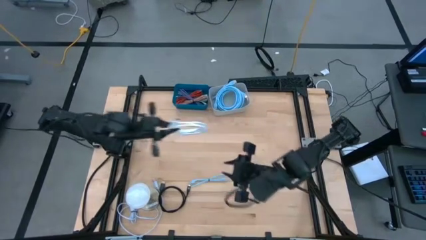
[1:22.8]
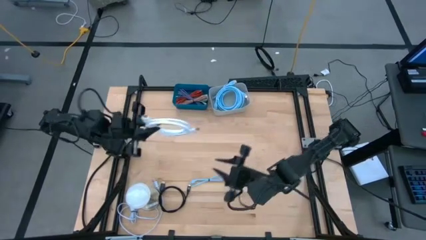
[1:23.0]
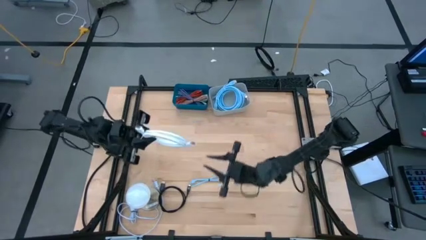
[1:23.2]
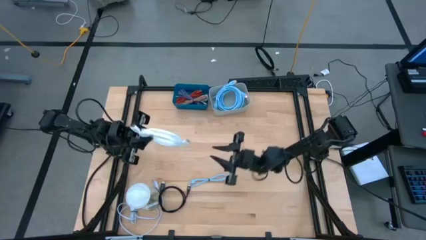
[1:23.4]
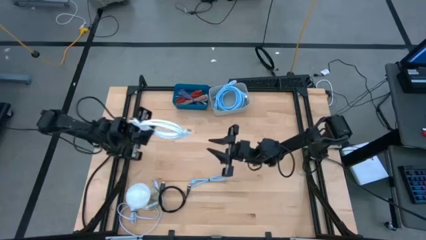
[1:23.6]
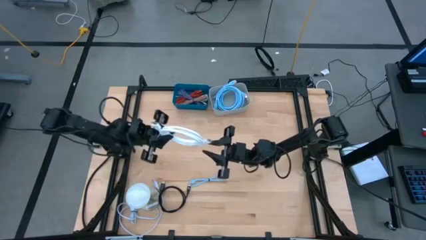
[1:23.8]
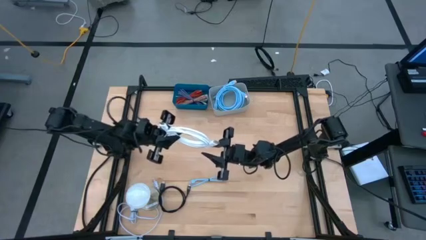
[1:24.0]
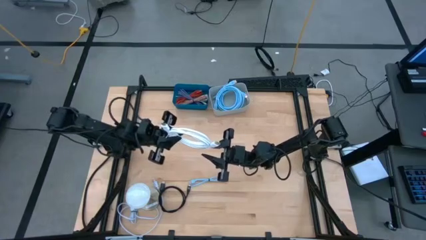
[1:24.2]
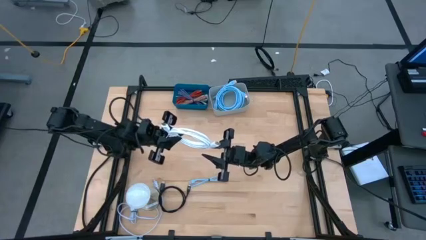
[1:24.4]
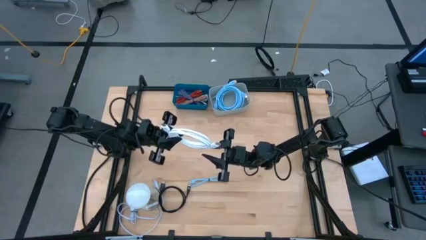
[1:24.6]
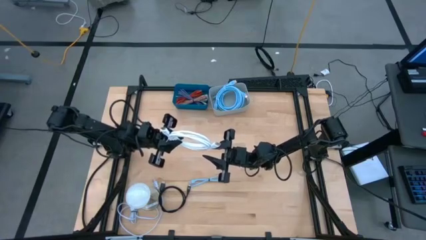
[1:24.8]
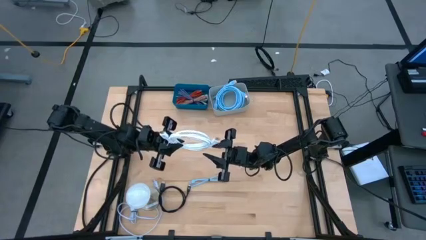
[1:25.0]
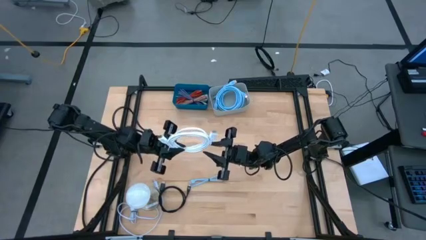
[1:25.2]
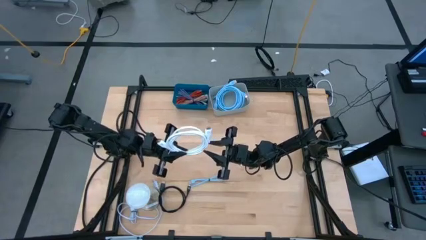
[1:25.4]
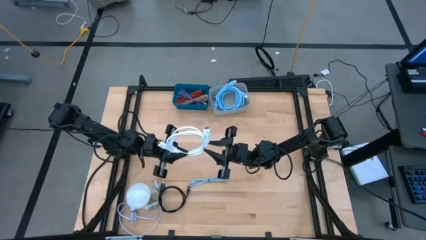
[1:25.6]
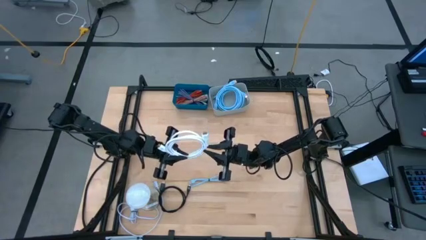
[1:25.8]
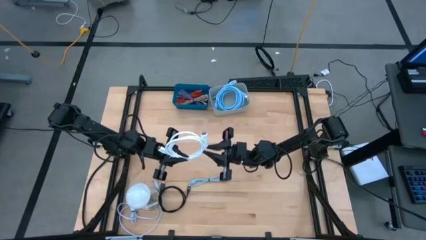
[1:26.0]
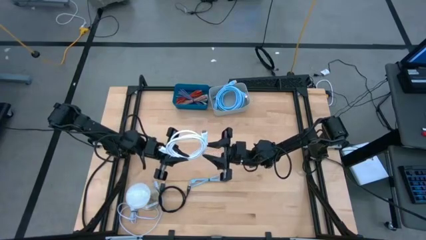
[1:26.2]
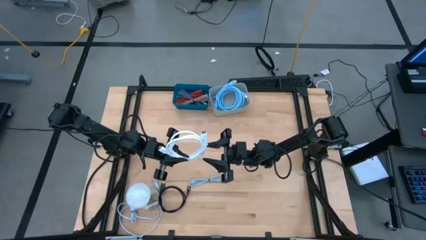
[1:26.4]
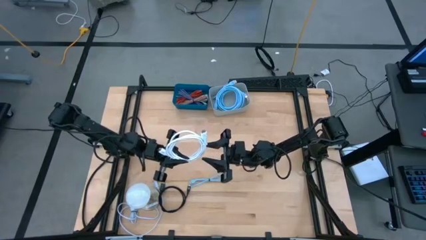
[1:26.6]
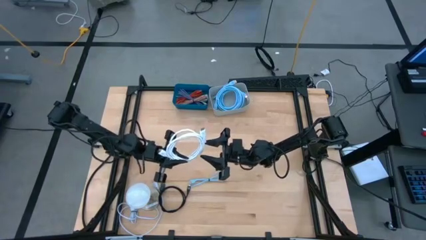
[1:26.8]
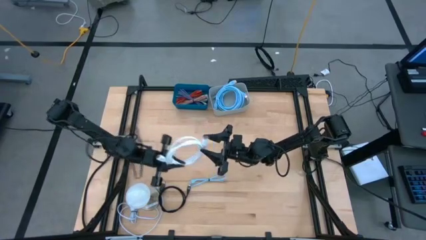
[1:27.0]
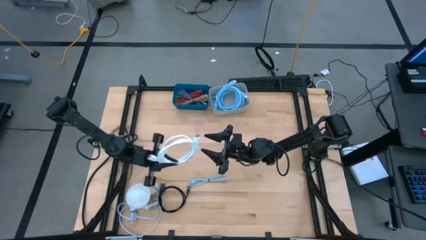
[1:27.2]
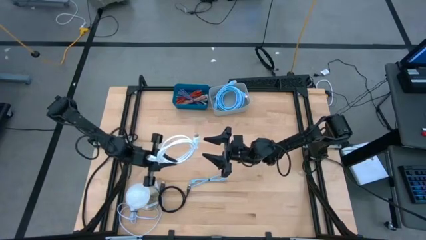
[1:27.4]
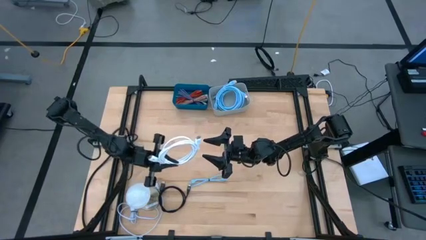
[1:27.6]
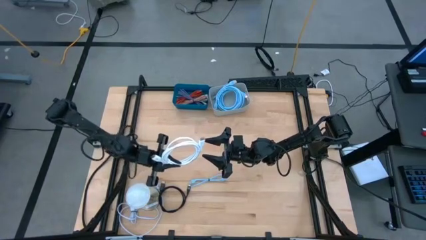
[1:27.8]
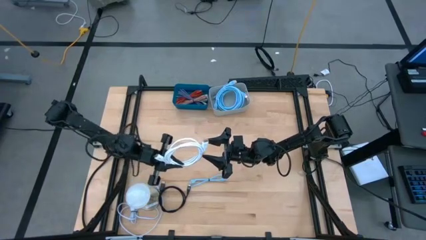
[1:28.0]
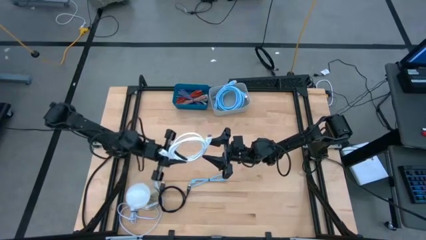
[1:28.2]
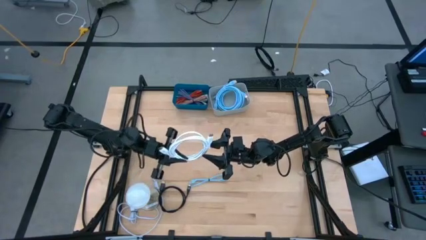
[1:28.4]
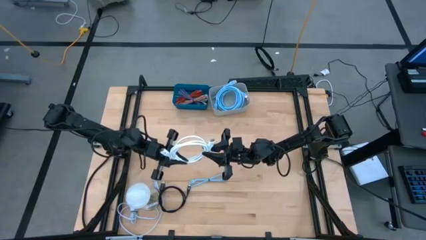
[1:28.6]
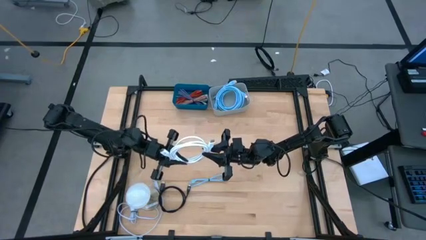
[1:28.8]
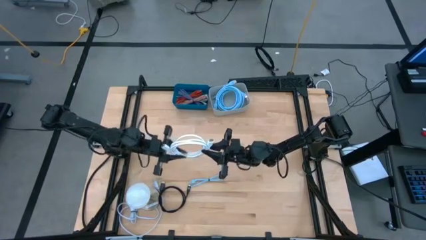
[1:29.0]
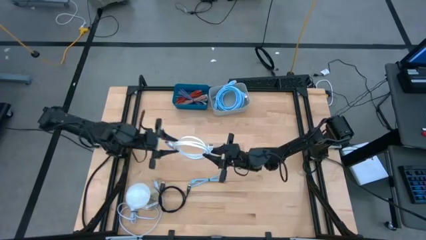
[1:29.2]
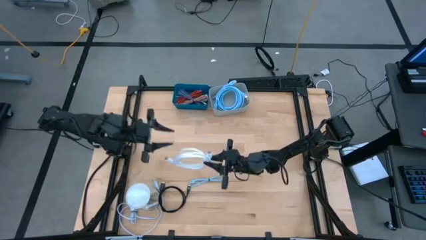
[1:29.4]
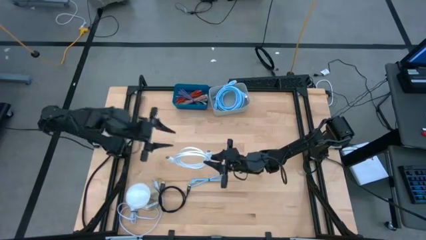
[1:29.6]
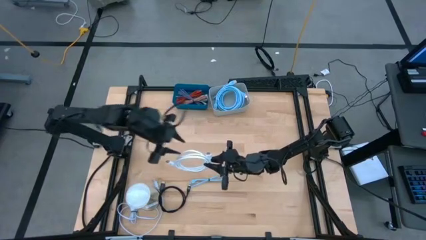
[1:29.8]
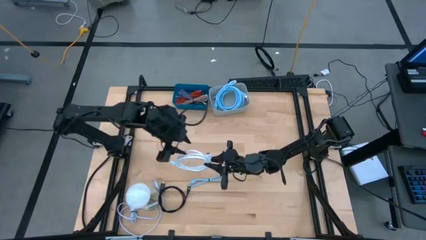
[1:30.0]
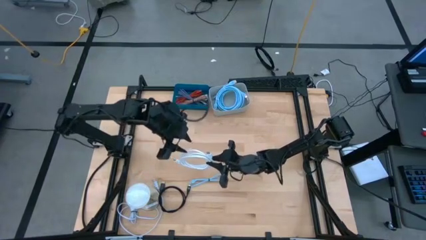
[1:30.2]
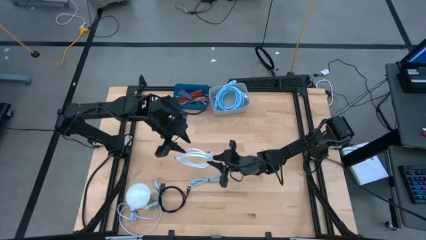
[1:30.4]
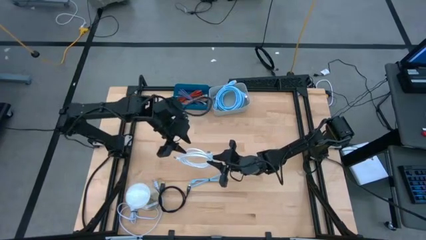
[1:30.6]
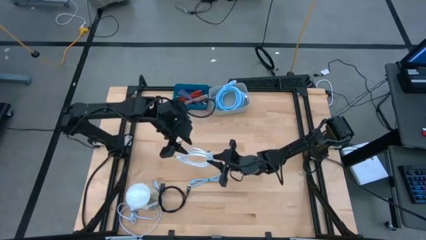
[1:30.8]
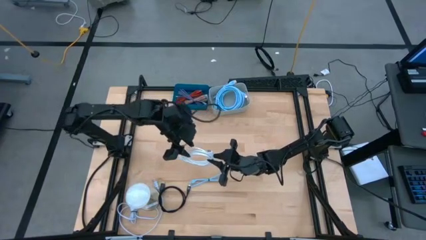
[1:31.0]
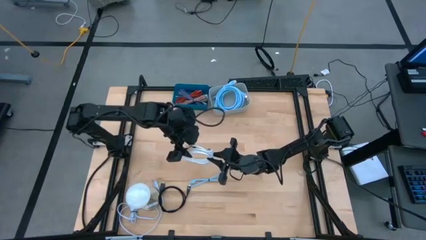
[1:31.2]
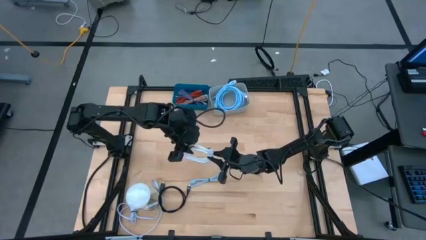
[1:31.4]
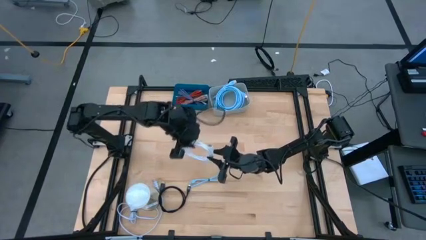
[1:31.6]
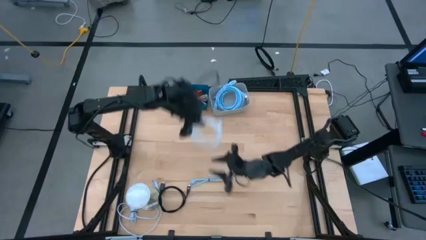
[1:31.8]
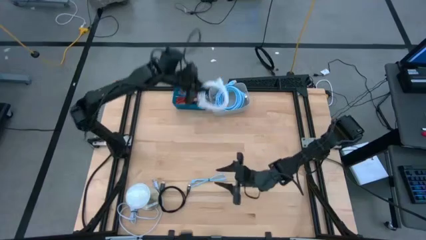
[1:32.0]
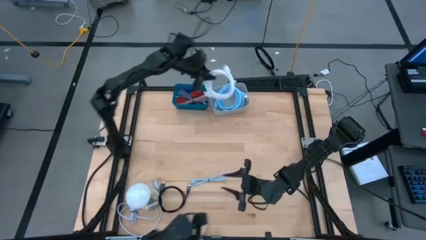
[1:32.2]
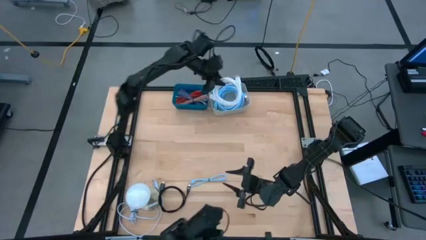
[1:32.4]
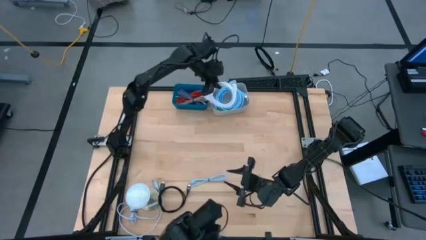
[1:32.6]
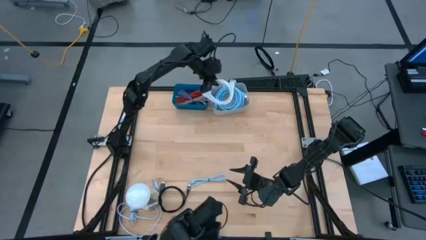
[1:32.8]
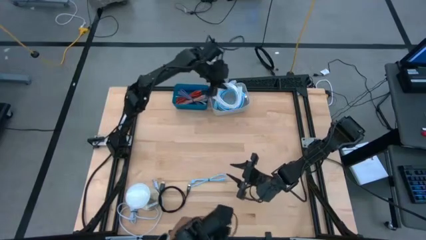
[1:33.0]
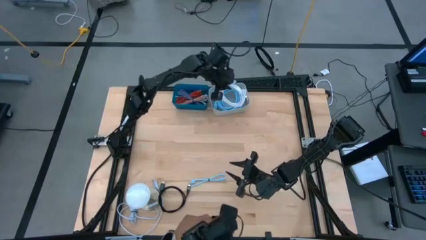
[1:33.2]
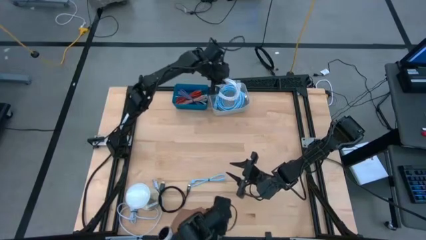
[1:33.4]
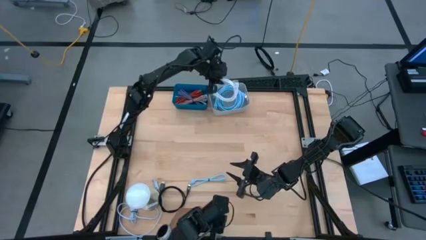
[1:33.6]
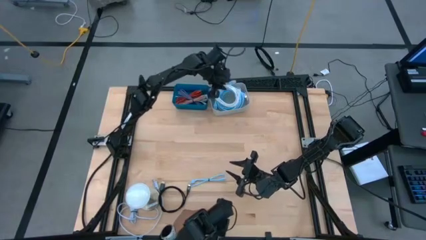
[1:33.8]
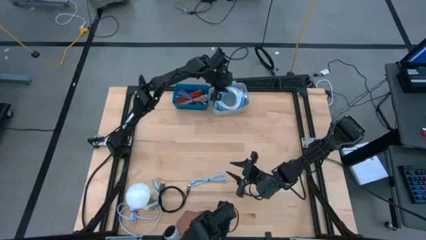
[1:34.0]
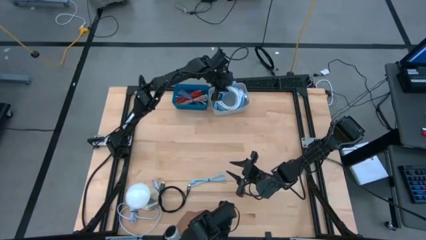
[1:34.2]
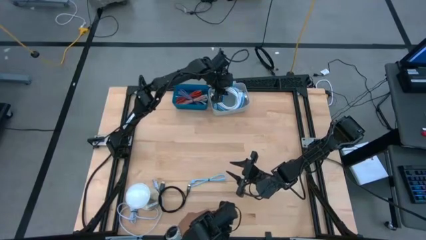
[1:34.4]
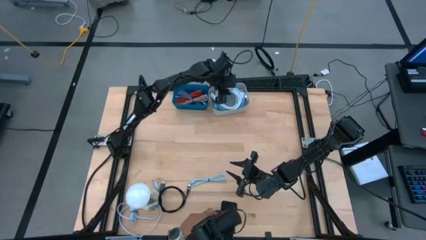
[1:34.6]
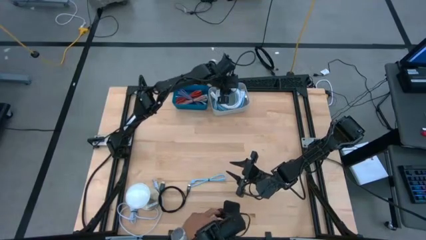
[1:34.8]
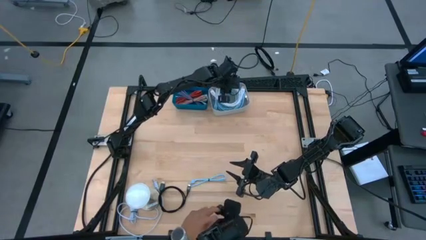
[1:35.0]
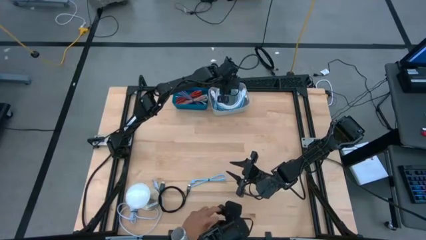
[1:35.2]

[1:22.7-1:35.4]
Task: Pick & Place USB Port
Put the white hdmi cable into the gray bin

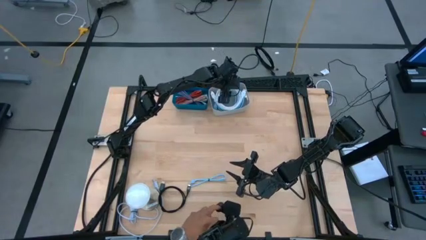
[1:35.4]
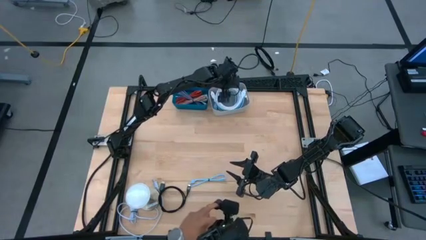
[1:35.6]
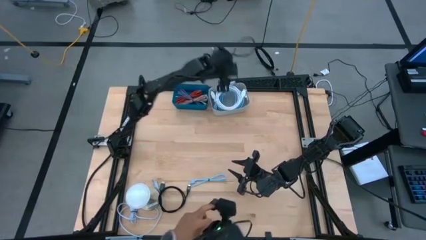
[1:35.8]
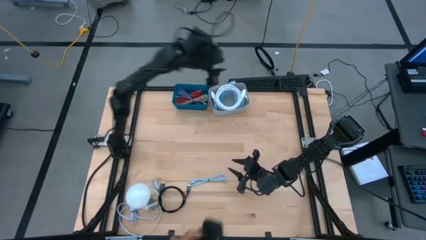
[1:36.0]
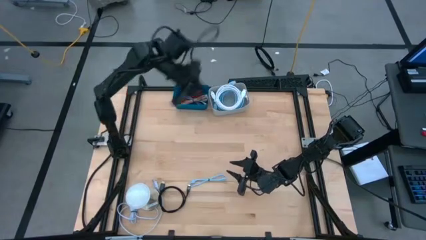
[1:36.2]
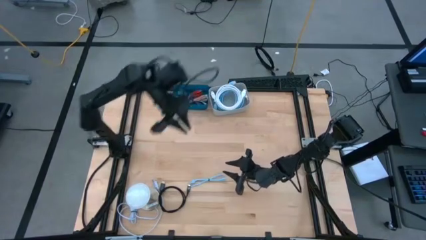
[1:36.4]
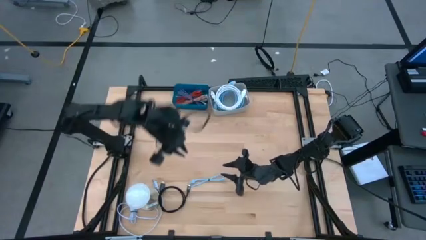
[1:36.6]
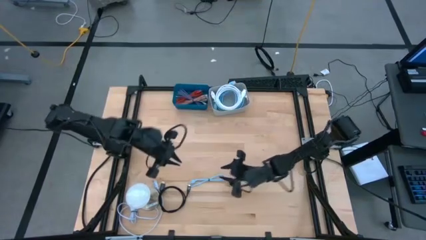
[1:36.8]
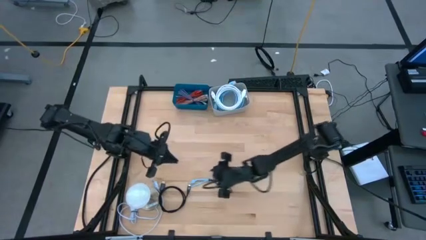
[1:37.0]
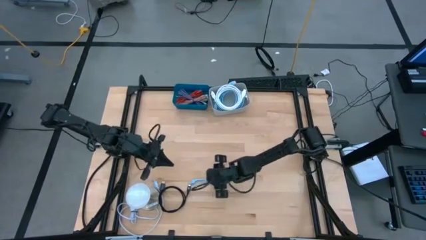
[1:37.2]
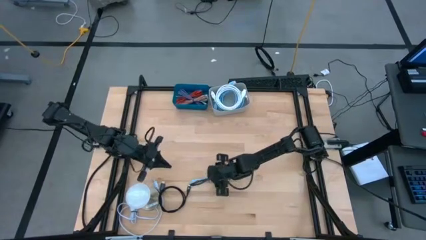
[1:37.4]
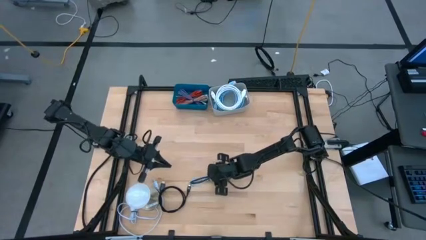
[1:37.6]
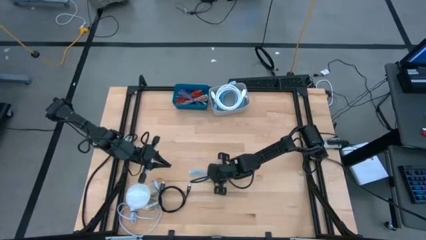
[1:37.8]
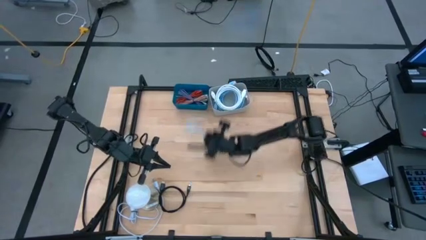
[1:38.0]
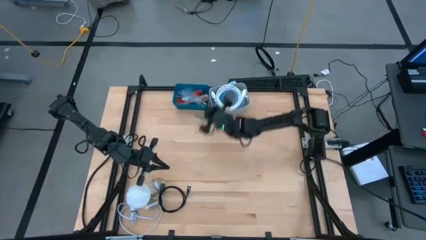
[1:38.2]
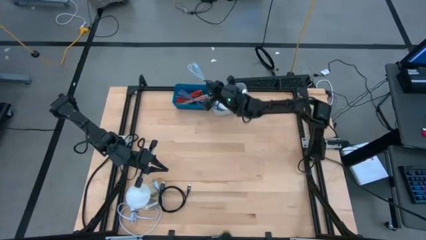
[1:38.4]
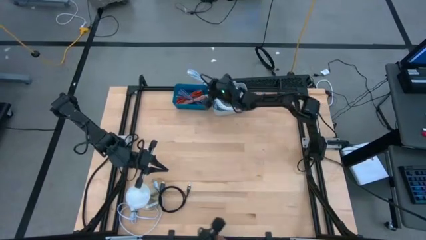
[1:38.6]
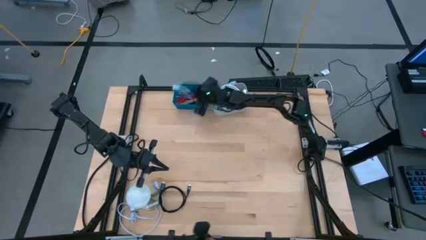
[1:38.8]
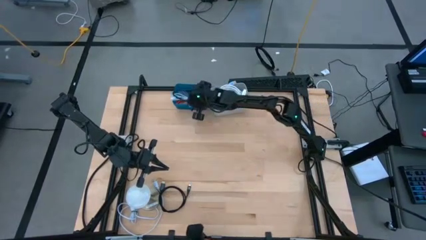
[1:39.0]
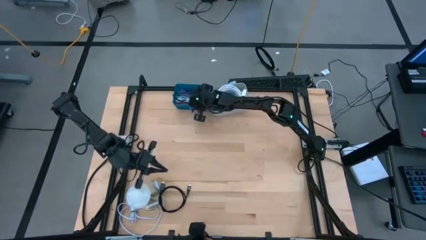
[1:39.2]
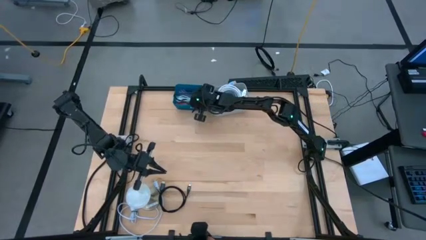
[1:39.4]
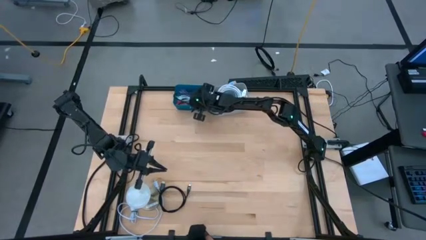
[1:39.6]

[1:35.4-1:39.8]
Put the blue usb cable into the blue bin
